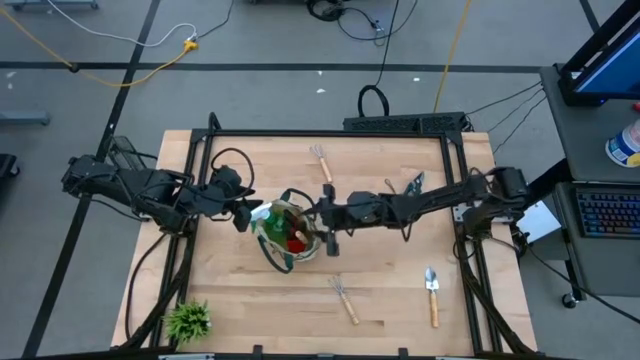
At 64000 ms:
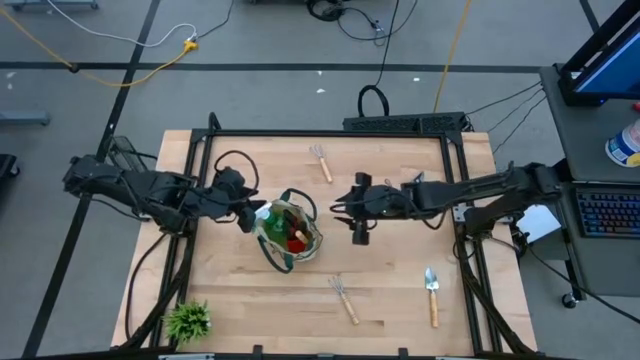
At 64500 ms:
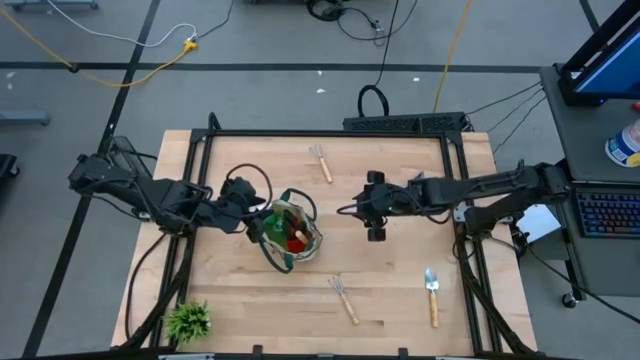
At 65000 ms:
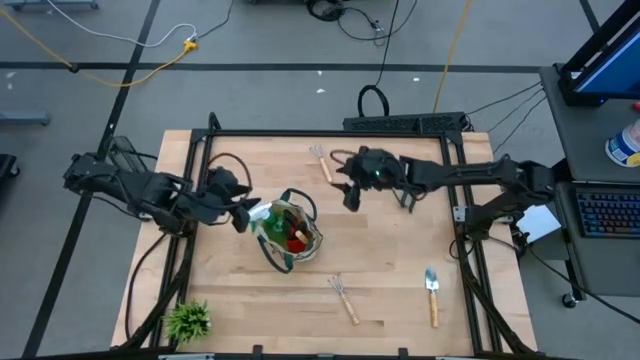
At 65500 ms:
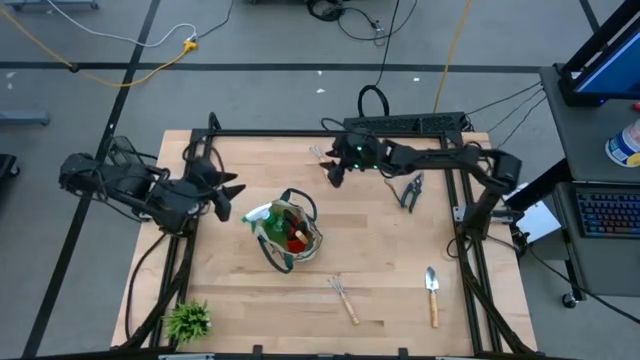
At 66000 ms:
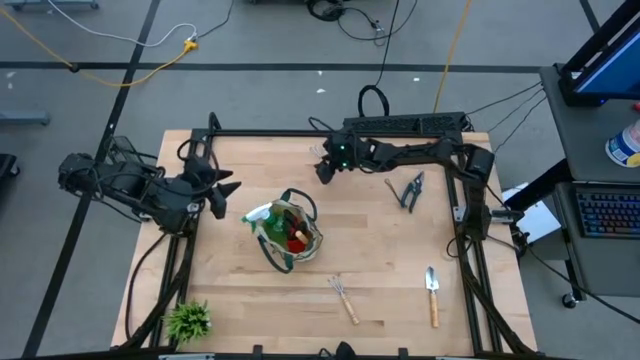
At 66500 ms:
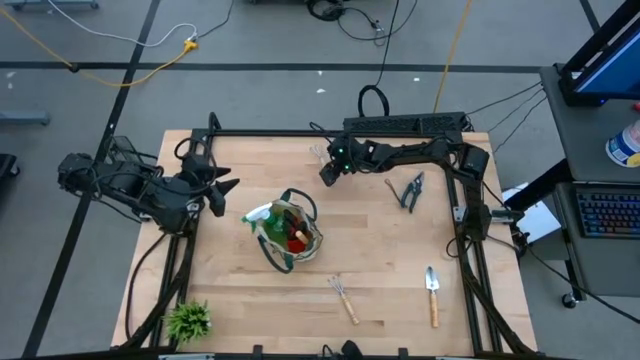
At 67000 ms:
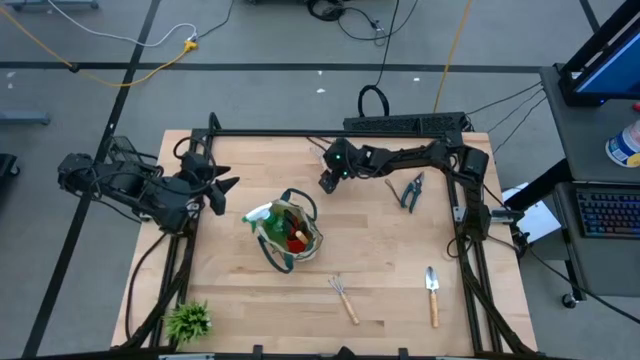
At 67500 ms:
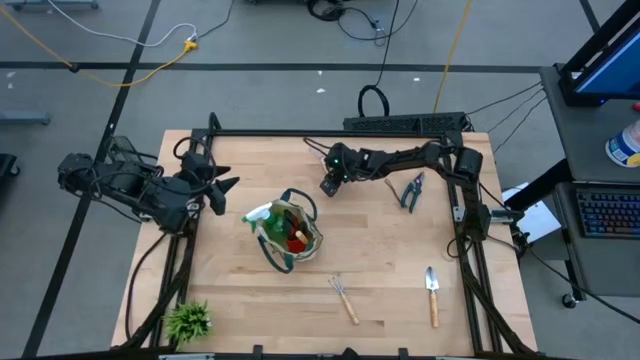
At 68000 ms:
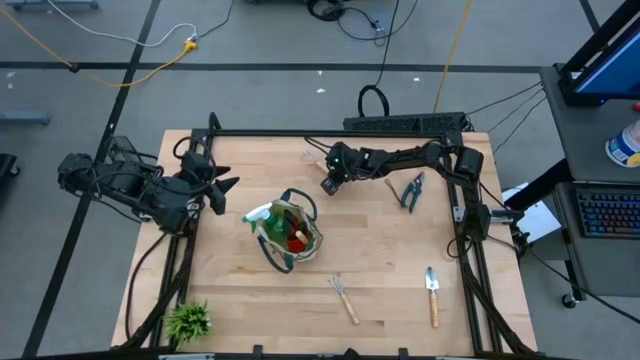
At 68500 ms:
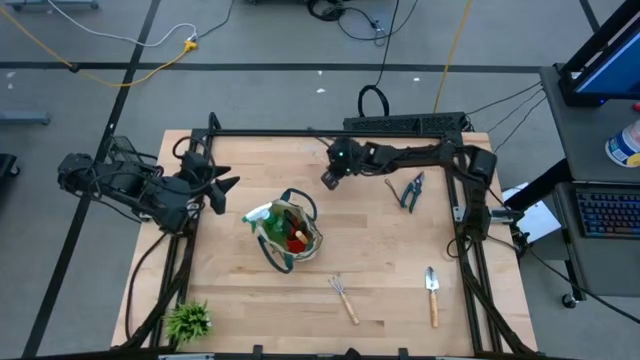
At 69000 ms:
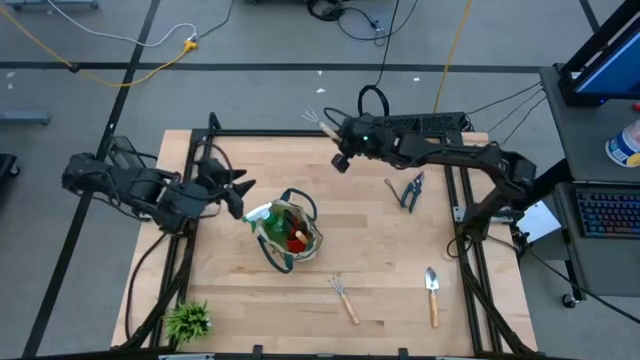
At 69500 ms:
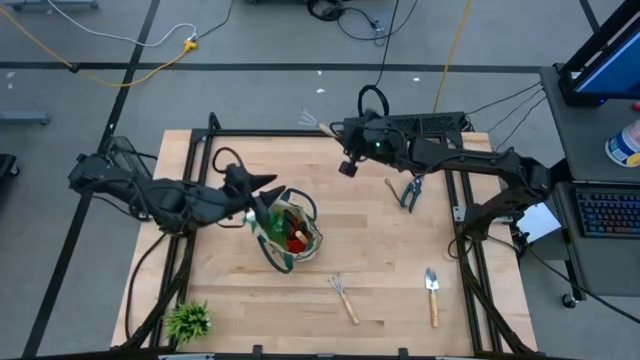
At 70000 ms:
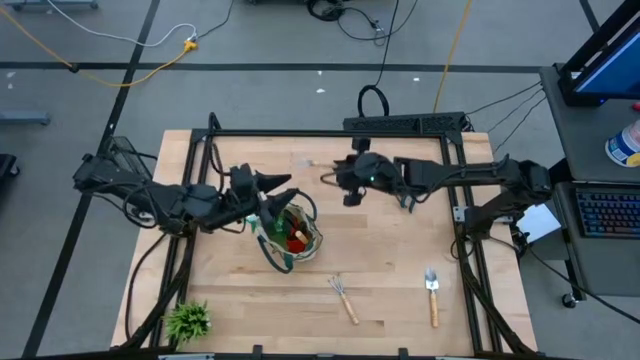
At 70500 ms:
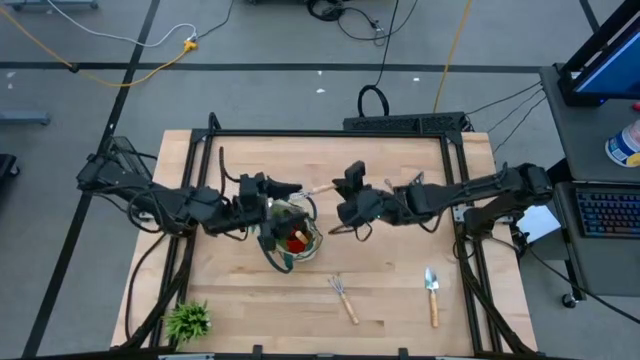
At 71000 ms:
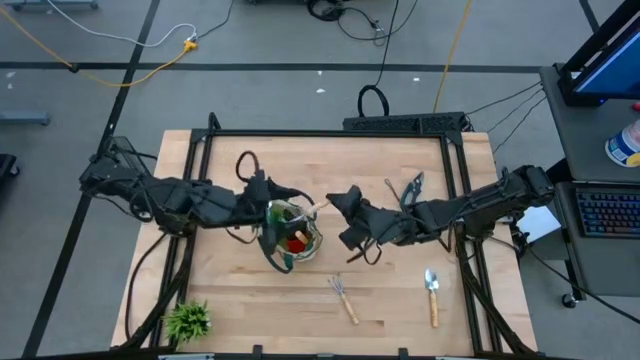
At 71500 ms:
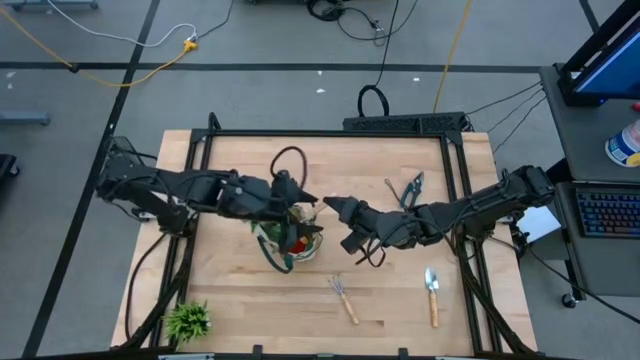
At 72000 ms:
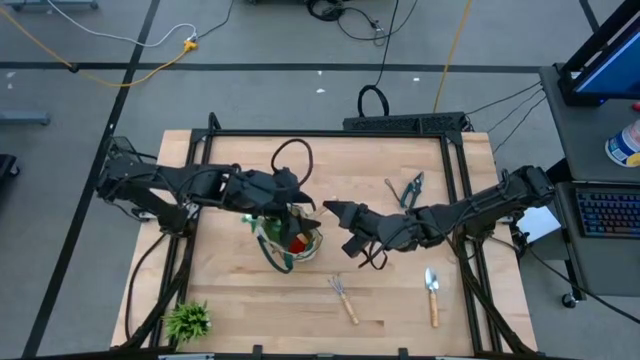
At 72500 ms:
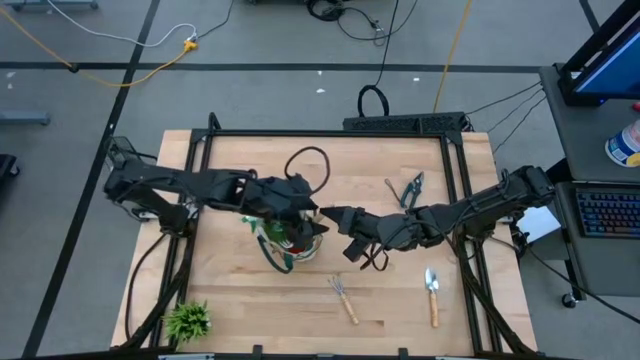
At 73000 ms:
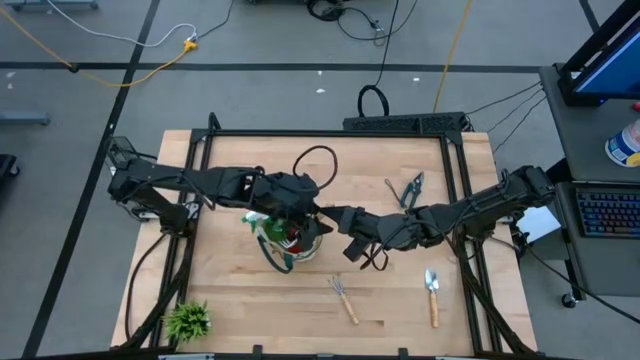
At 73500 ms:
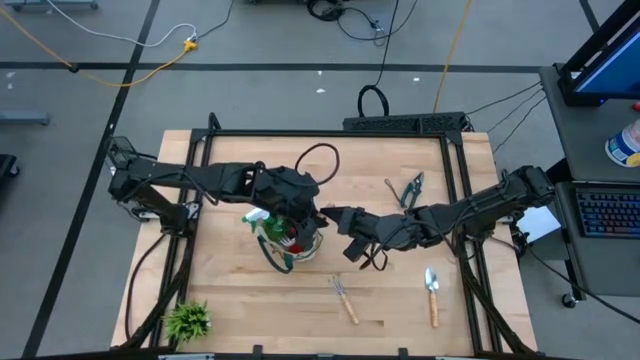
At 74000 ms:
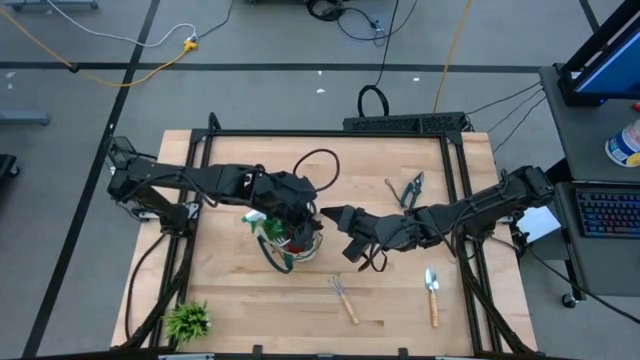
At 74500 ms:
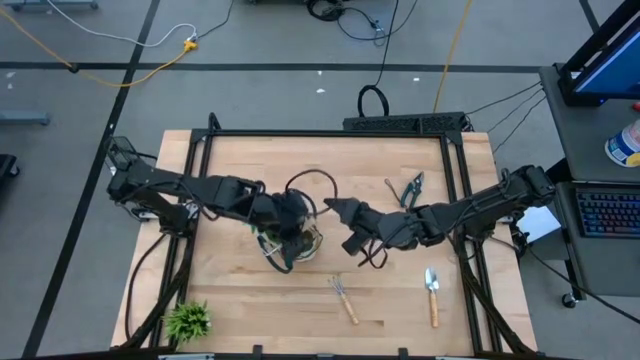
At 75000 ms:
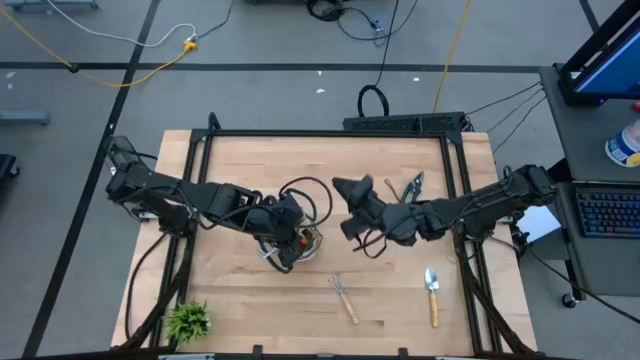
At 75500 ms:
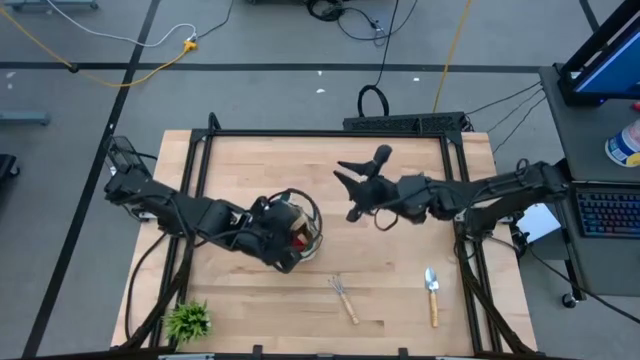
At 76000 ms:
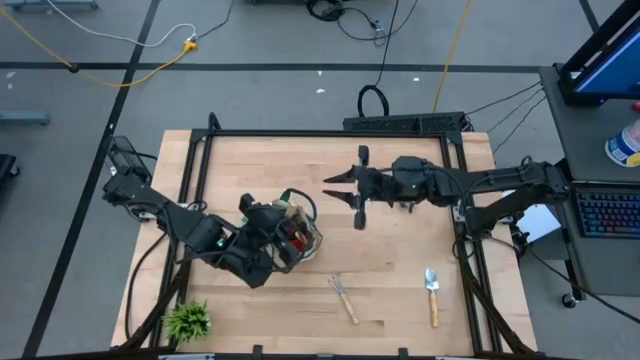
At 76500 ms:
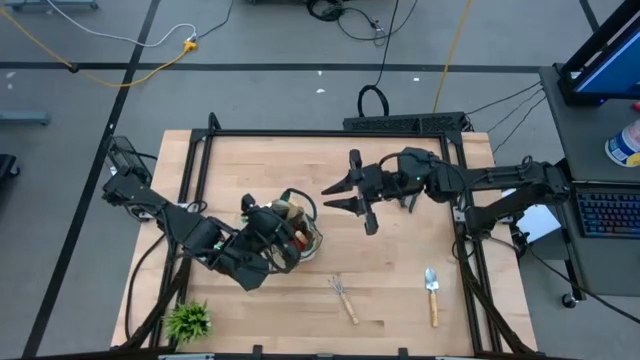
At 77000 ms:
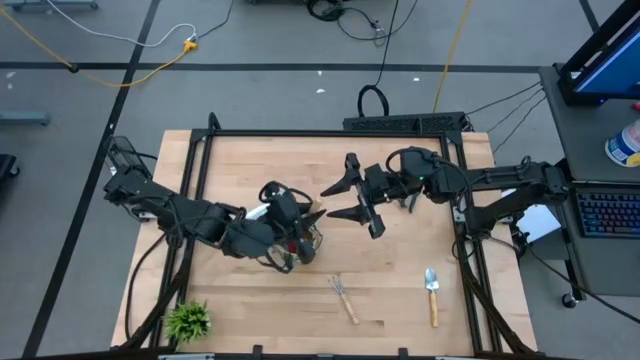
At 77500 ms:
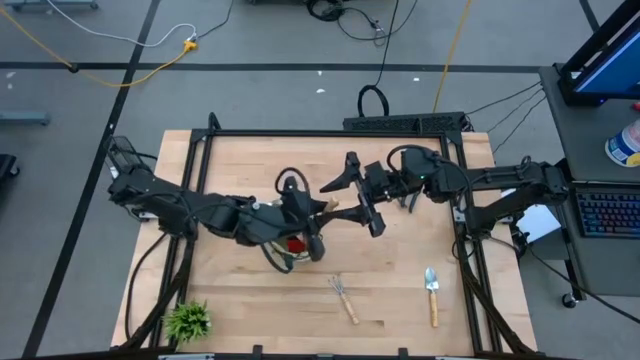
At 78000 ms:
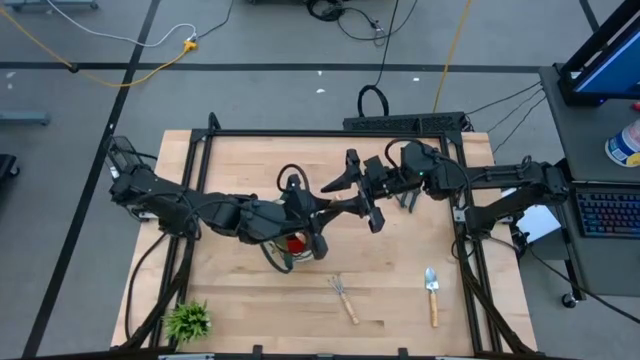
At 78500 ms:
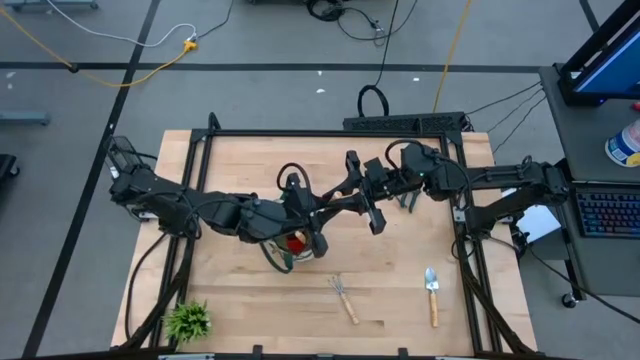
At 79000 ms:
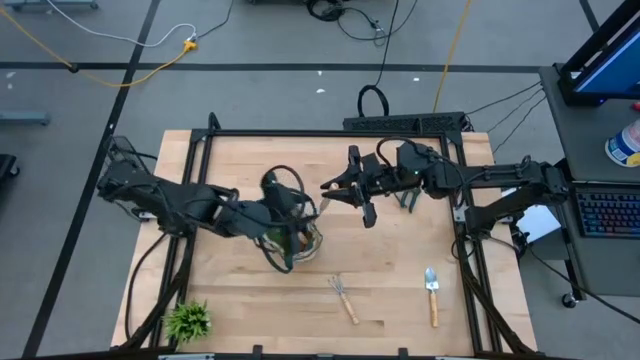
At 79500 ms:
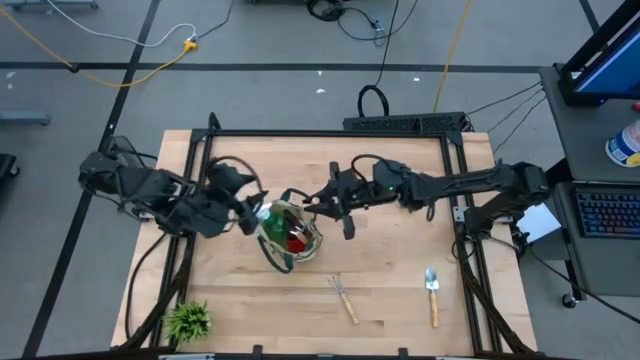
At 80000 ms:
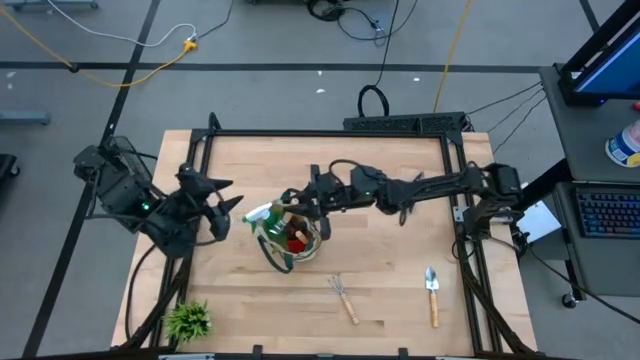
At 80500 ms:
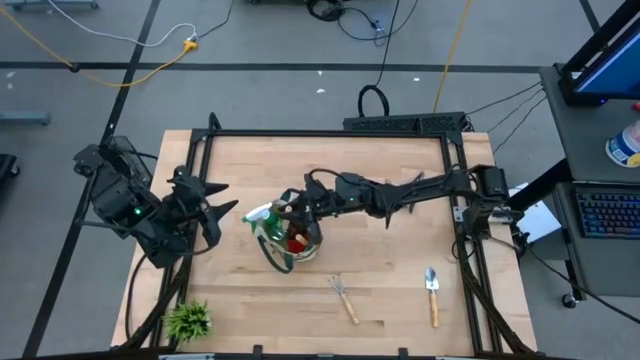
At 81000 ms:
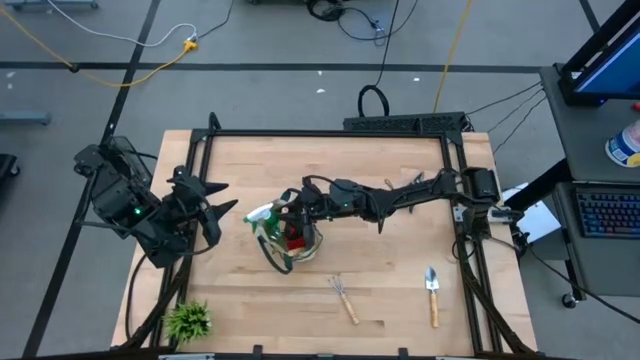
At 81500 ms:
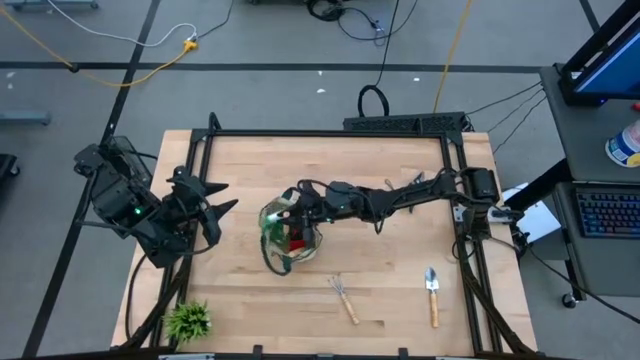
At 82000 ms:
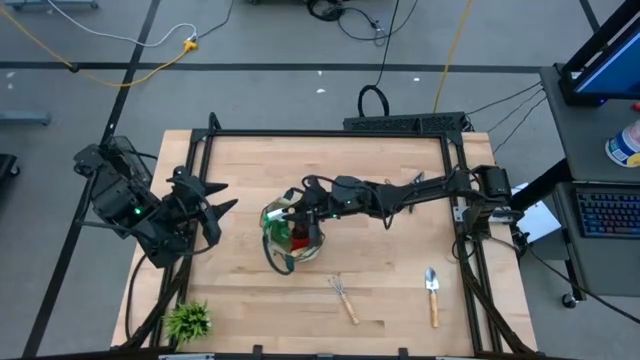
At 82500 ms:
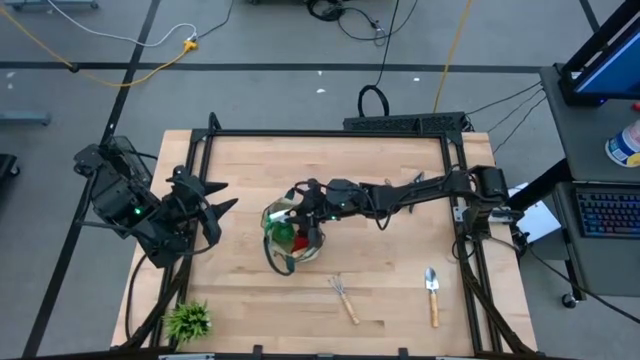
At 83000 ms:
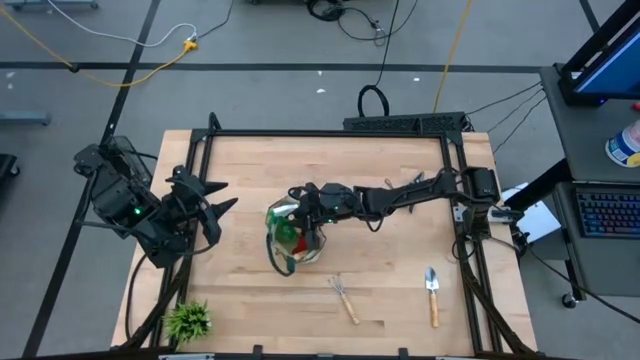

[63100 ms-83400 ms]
Task: Pick & Place Garden tools in Gardening bag
Put the top hand rake into the gardening bag
